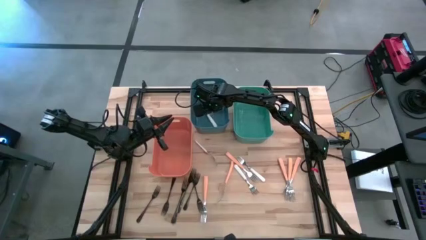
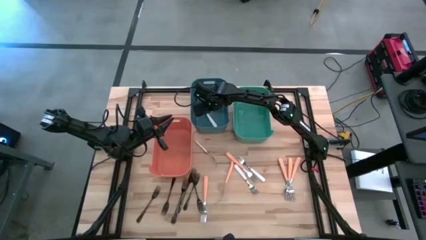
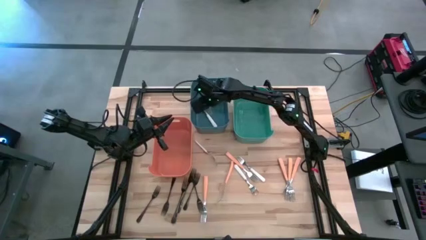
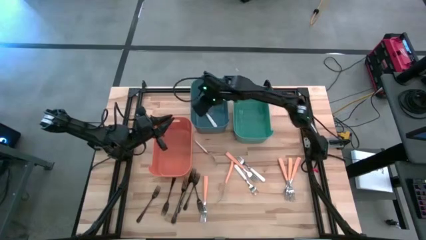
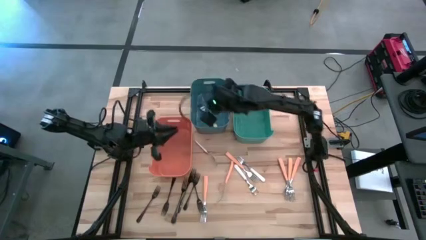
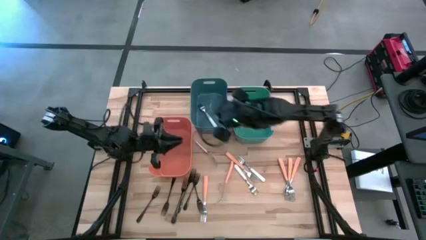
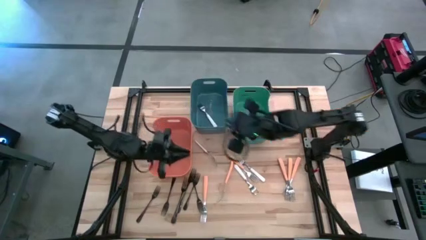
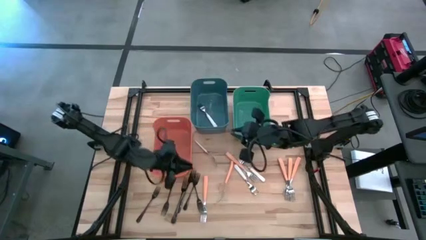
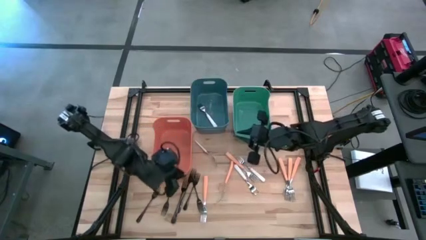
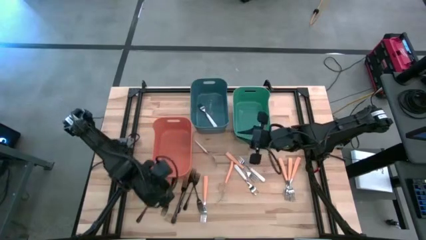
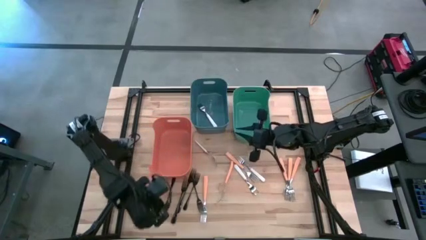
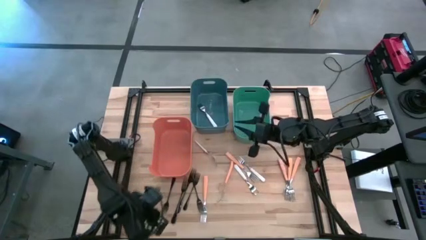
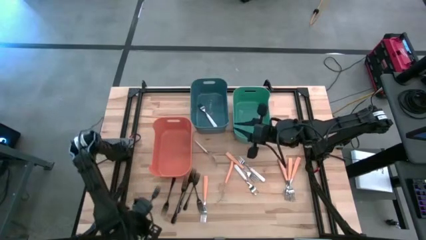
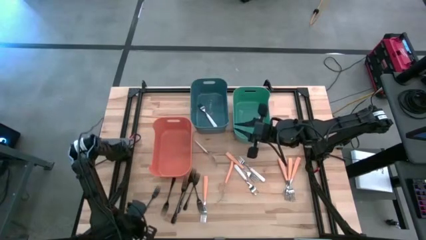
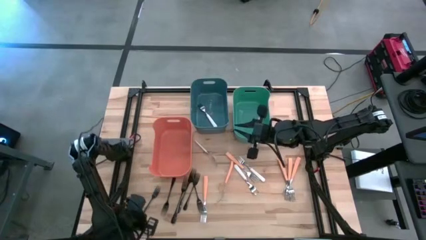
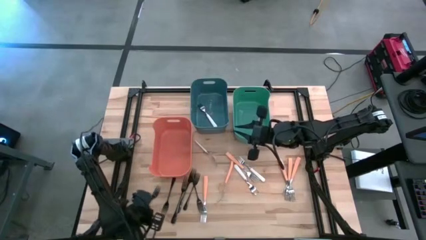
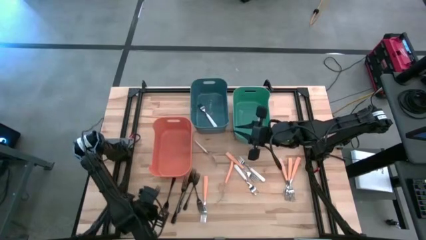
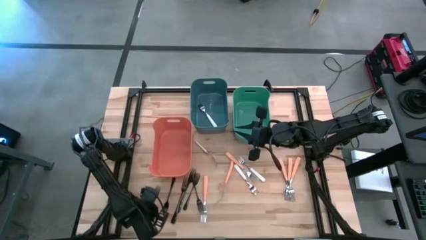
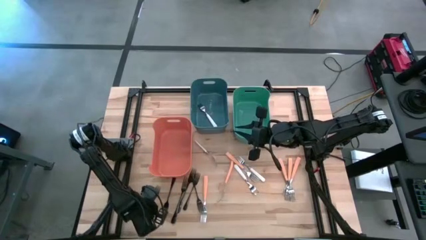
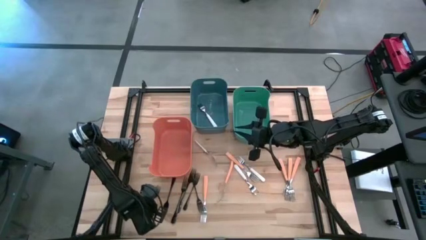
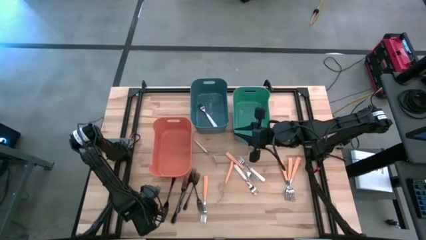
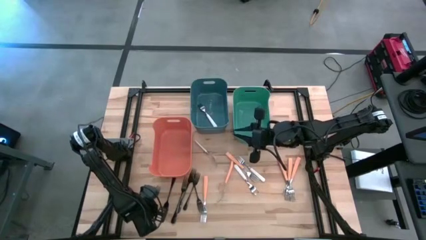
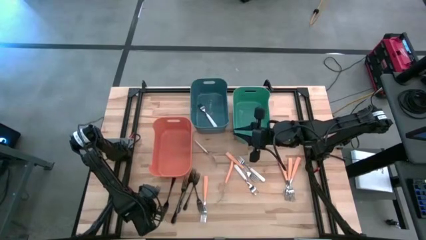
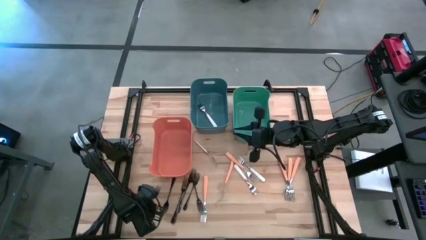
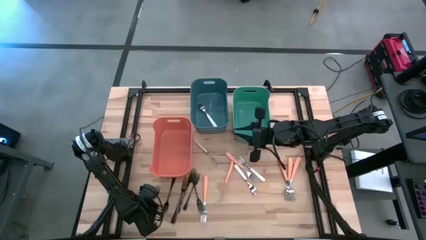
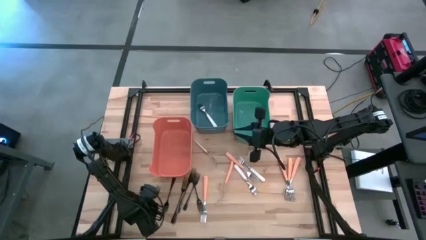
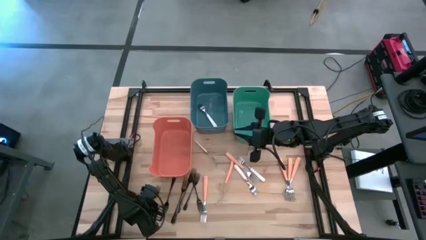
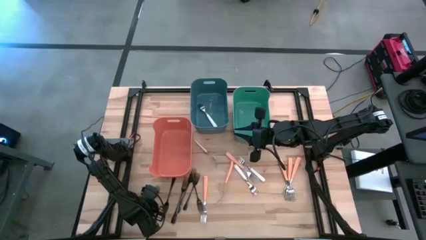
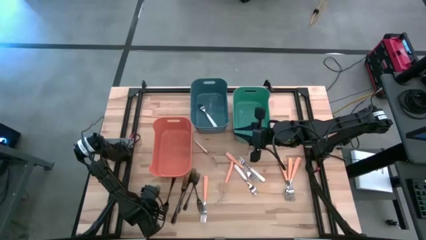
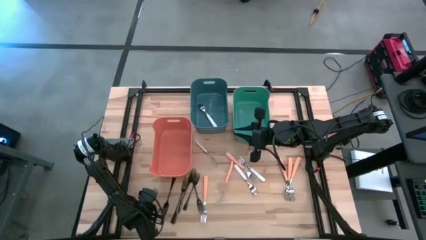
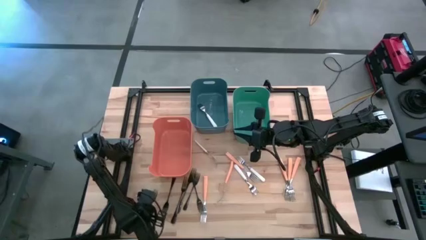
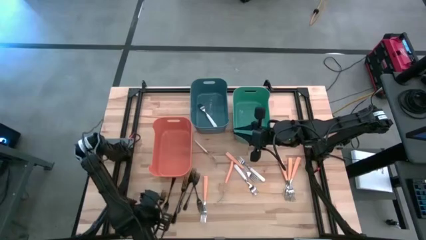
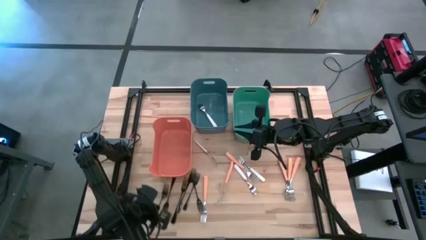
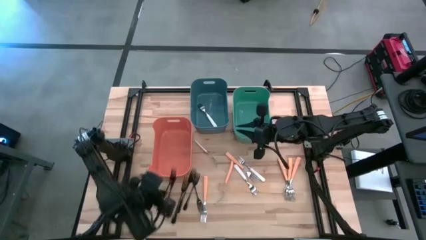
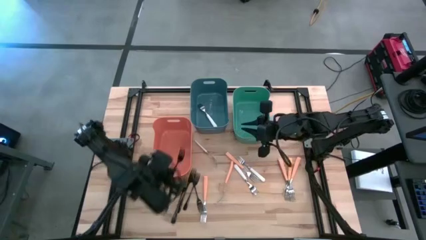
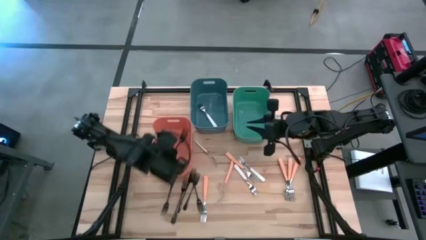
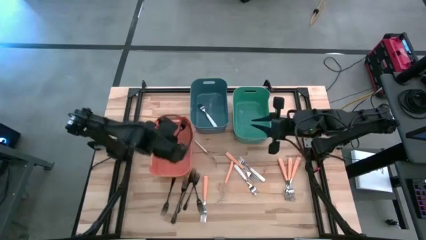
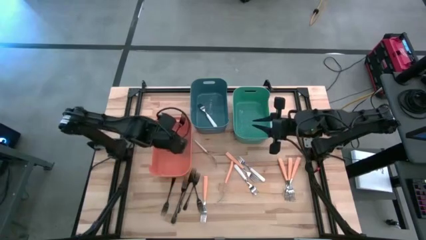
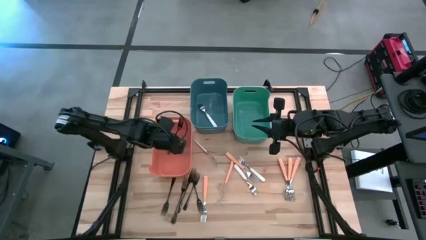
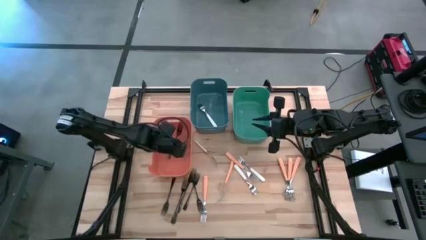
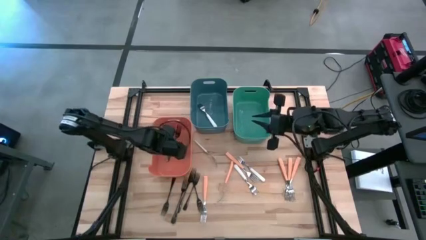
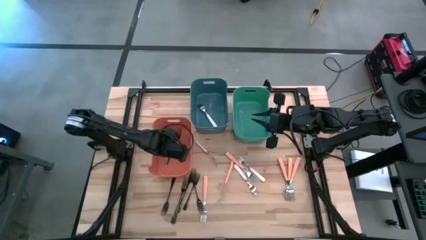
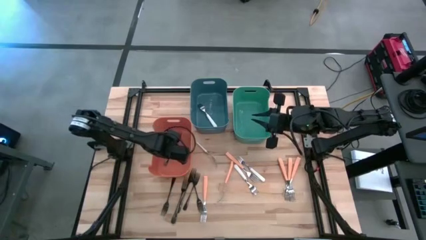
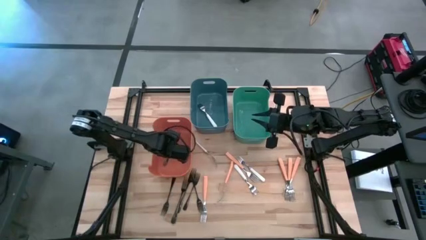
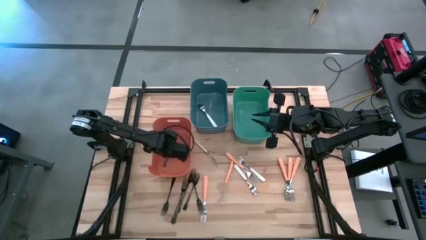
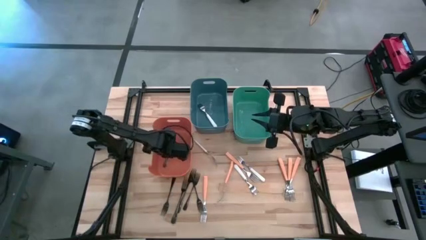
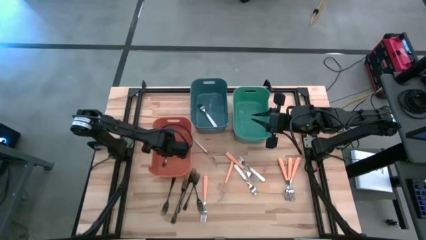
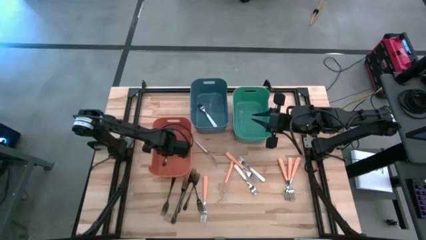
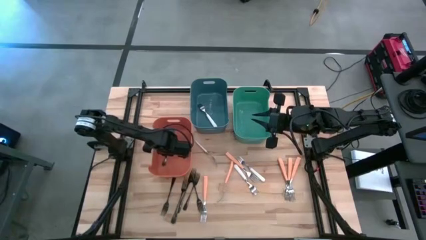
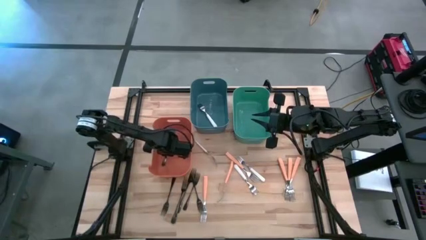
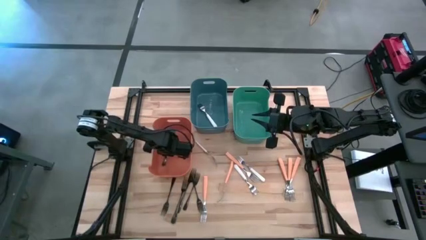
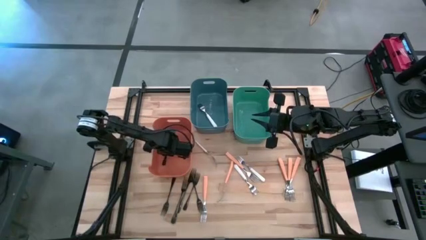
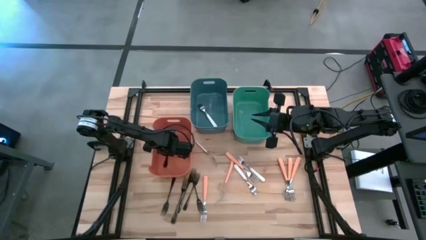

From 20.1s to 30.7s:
Task: Sort silverware by color (type)
Put the black fork into the orange bin
